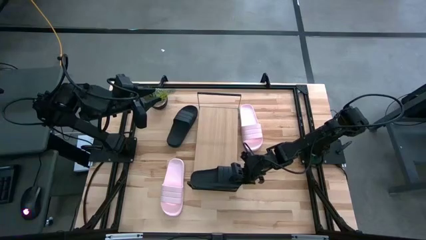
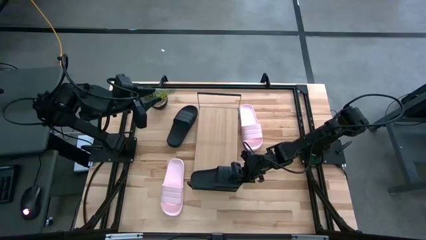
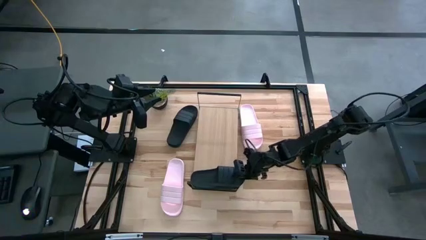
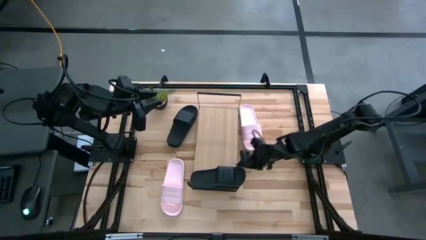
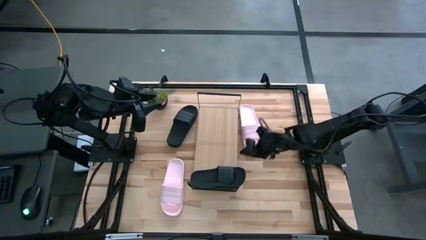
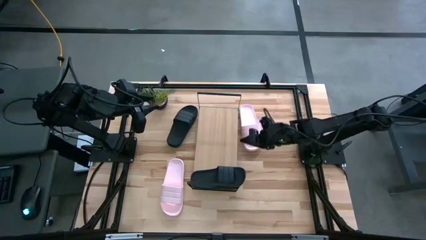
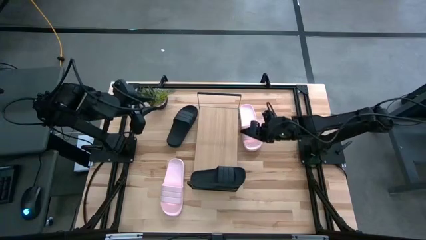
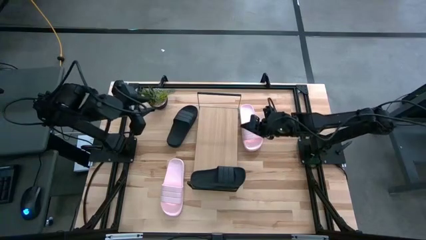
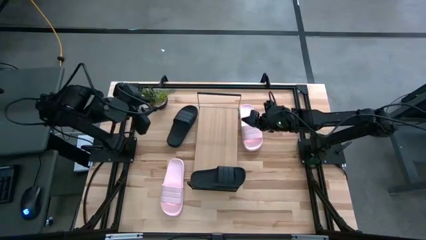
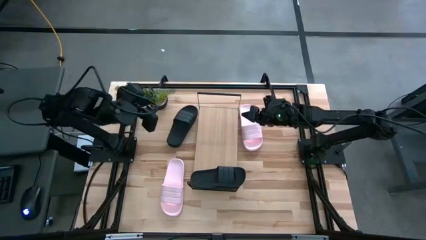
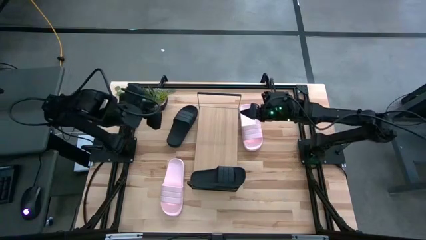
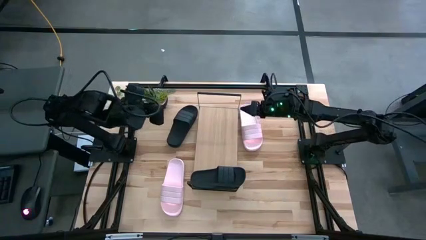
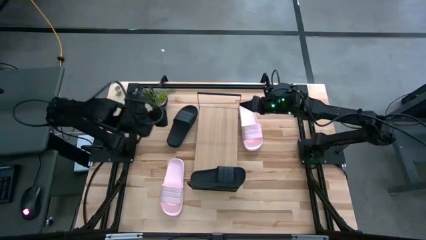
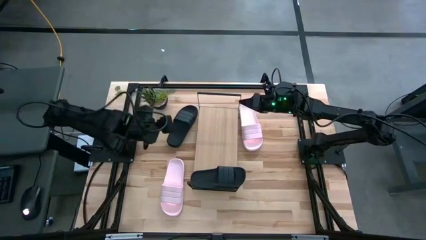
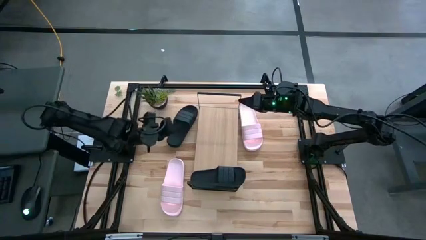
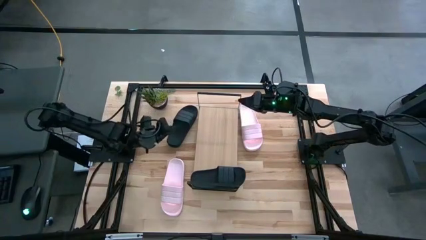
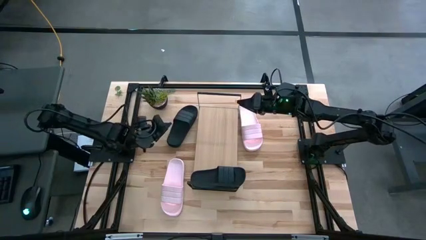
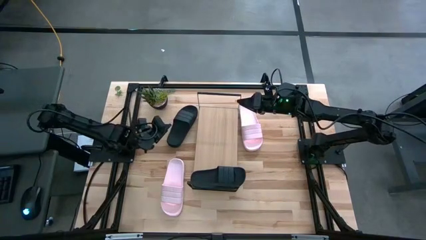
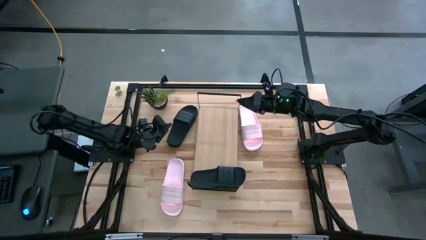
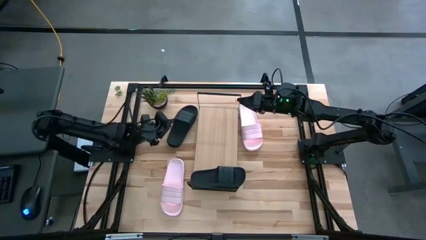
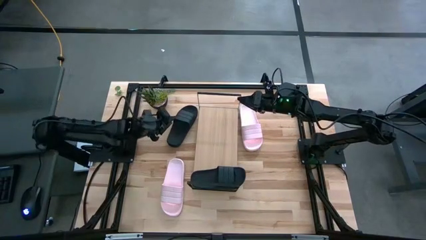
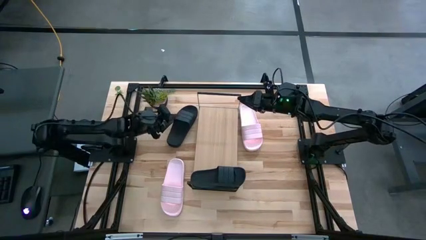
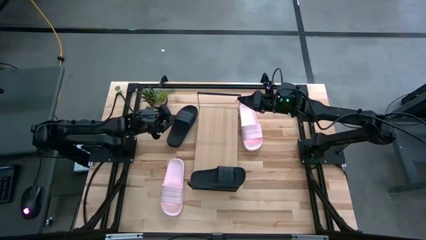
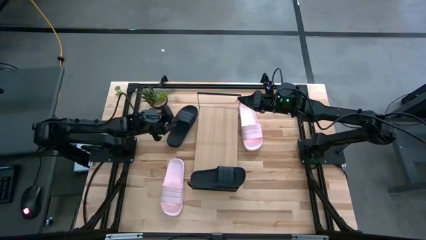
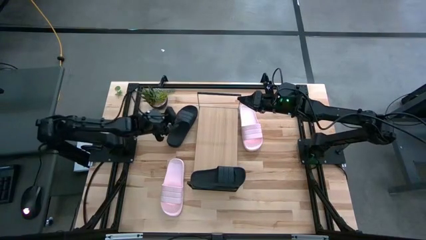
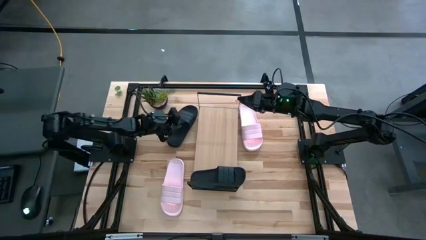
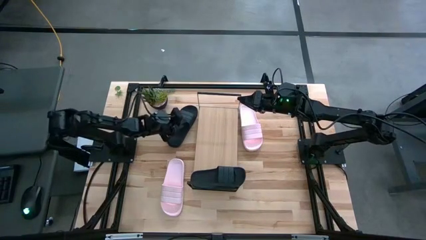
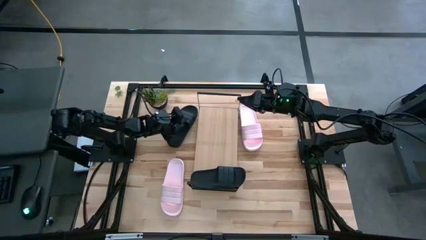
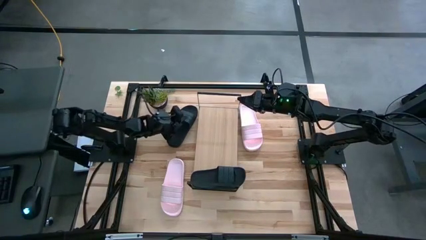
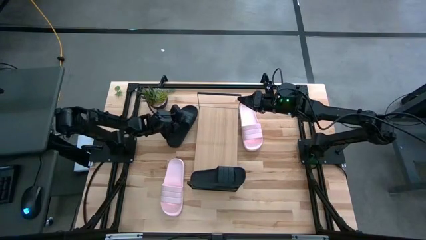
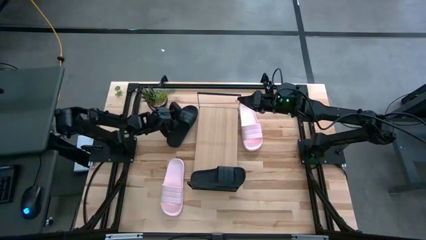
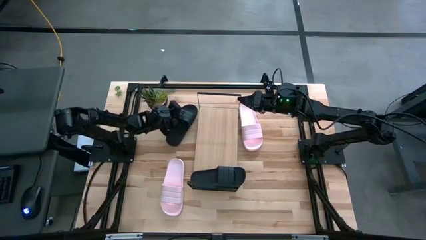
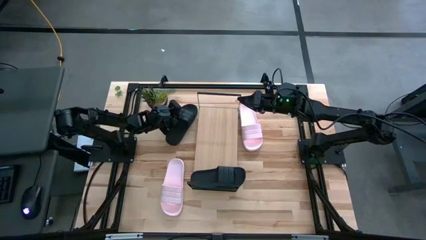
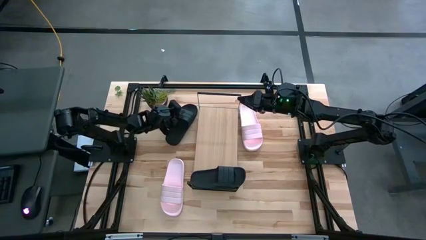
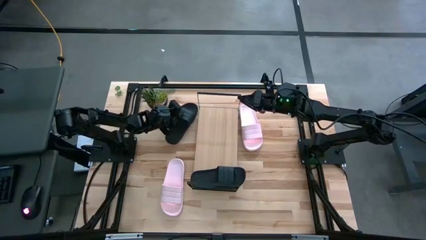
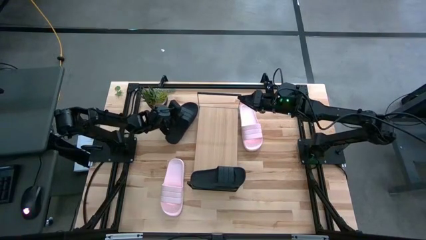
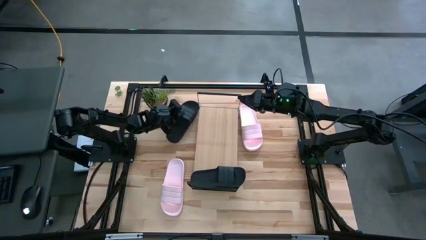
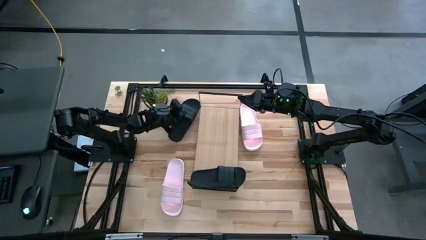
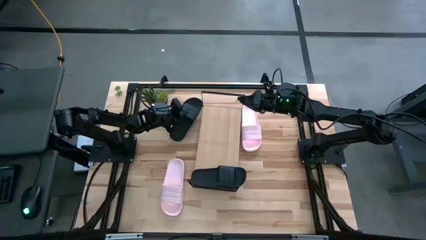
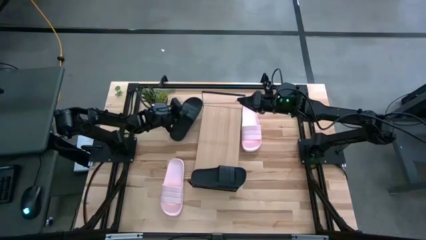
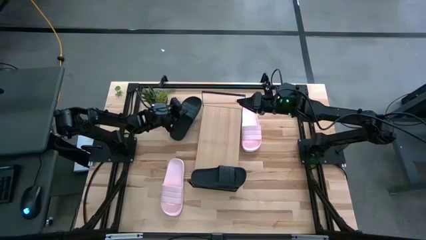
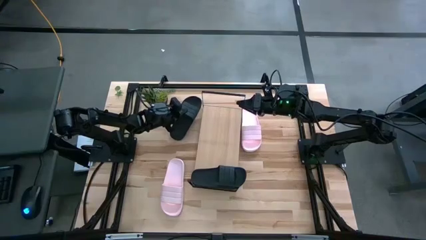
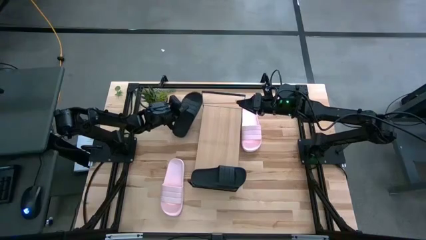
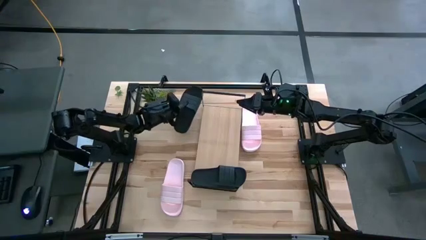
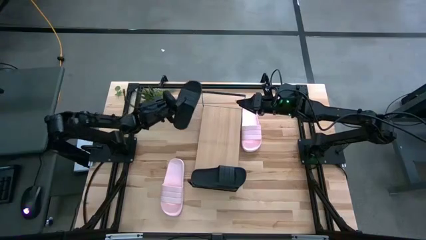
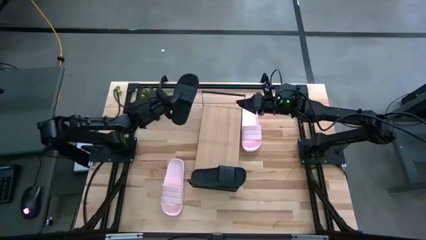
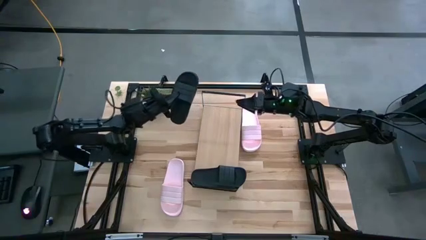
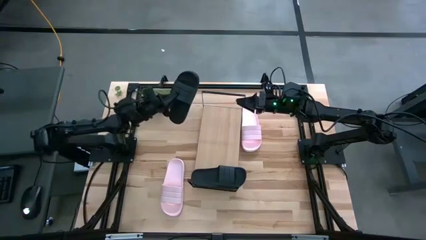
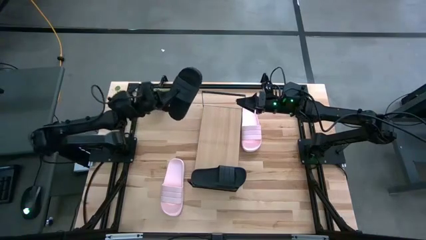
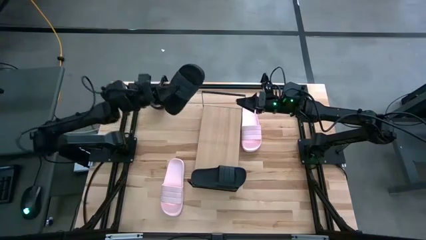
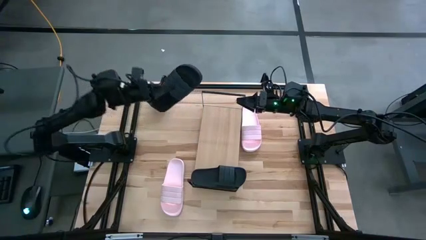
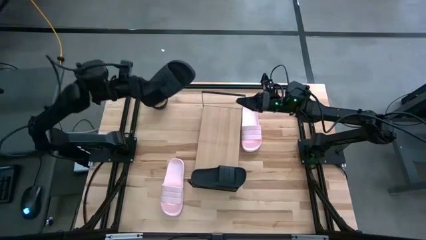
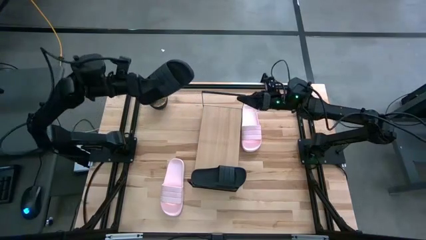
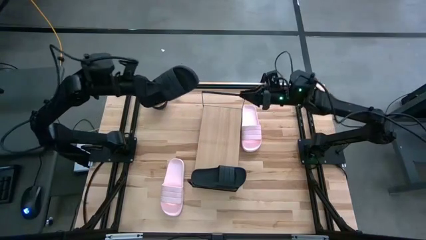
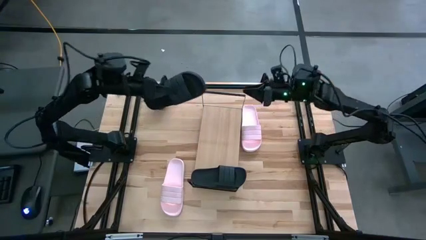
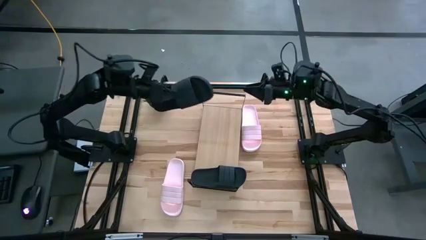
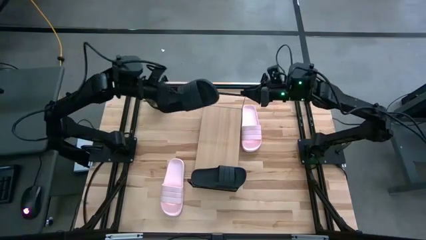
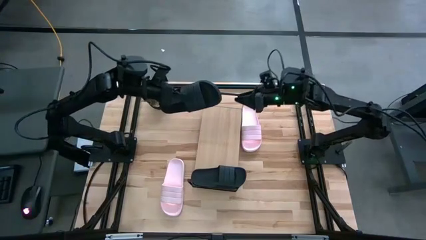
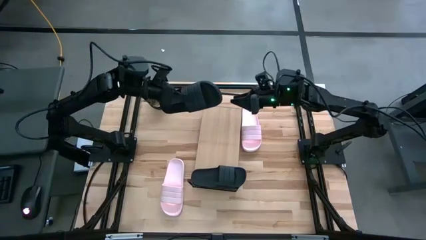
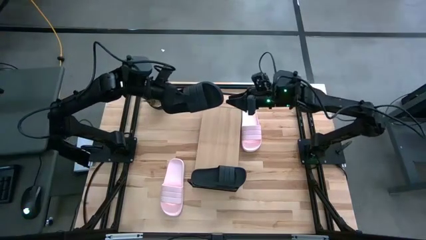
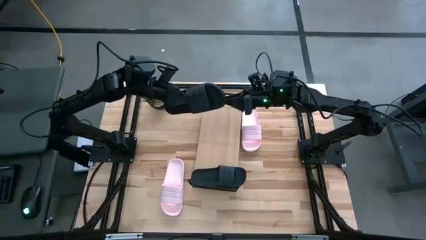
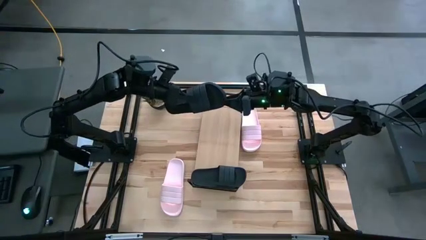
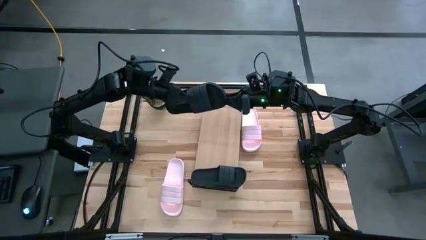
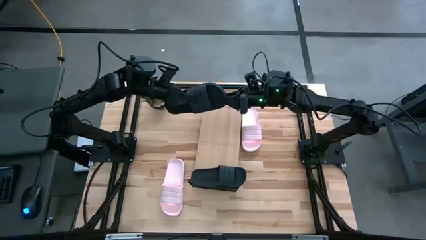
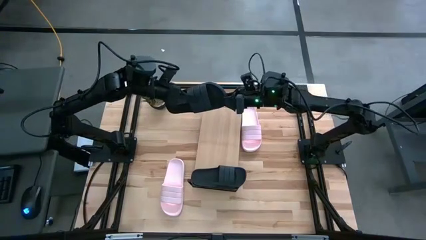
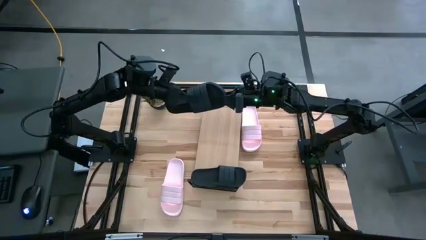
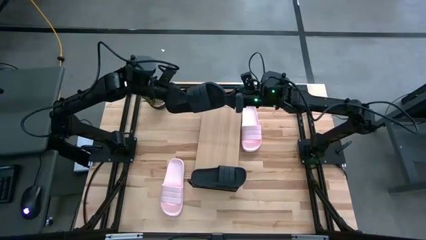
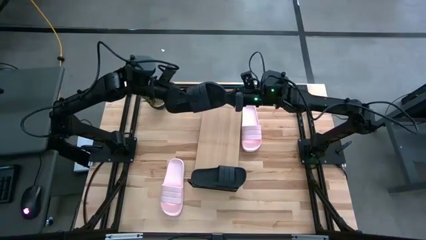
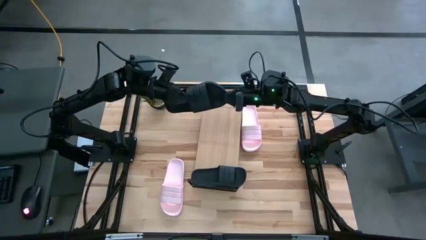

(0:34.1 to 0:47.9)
Task: Pick and place slides into the shelf
Put the black slide on the shelf
